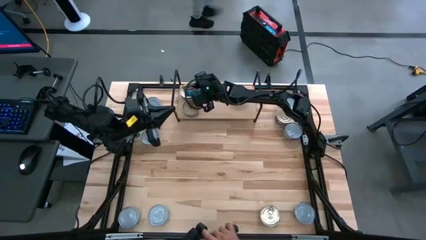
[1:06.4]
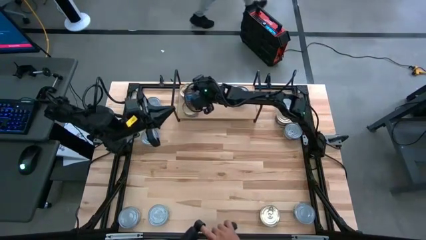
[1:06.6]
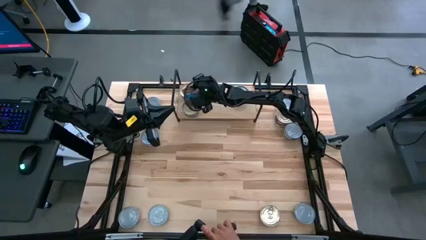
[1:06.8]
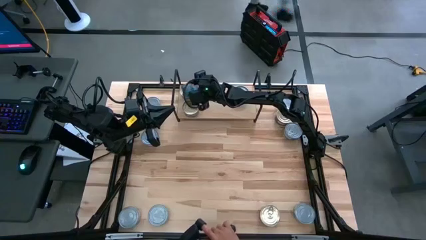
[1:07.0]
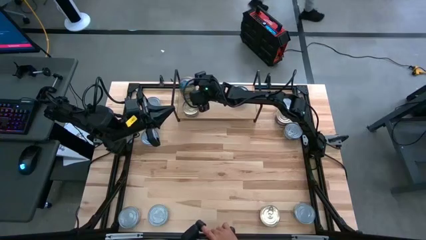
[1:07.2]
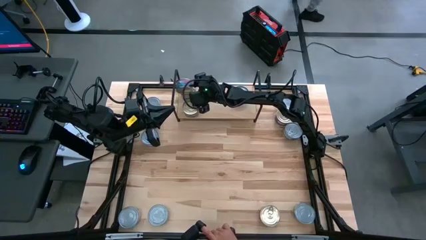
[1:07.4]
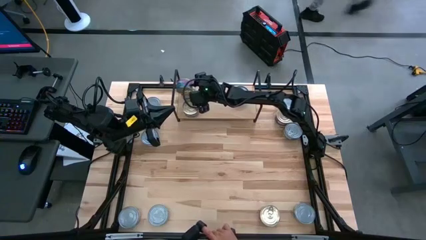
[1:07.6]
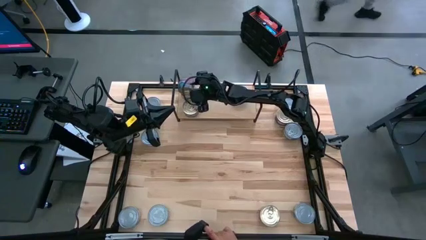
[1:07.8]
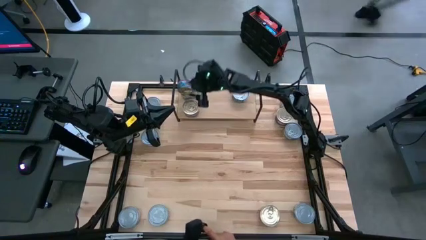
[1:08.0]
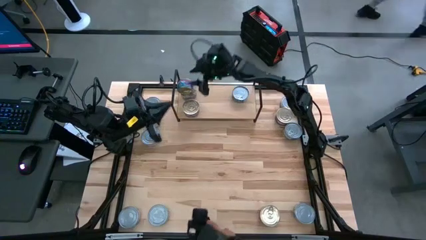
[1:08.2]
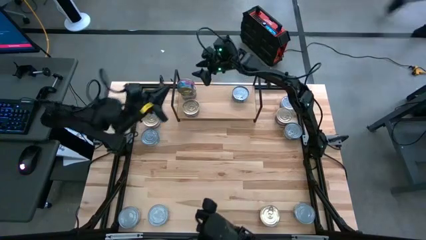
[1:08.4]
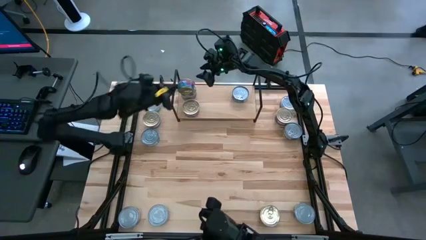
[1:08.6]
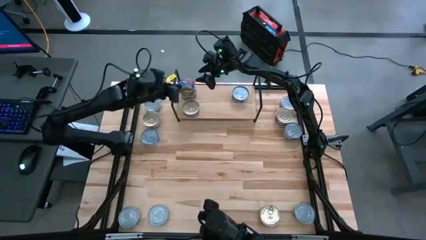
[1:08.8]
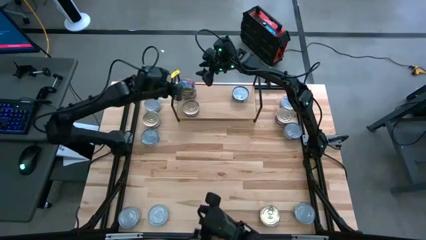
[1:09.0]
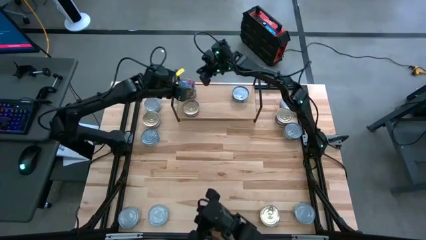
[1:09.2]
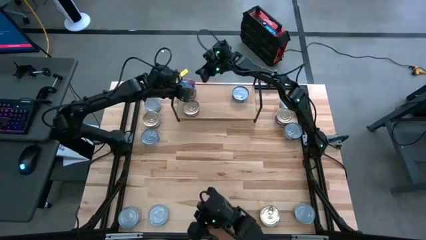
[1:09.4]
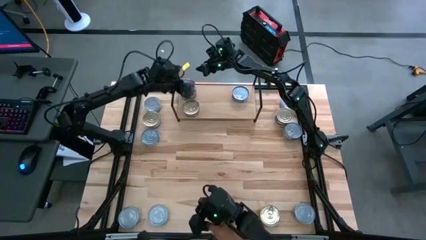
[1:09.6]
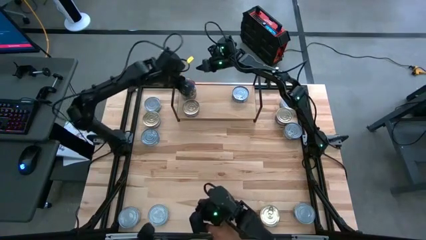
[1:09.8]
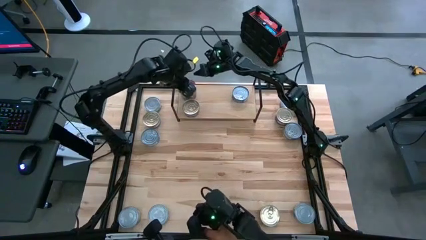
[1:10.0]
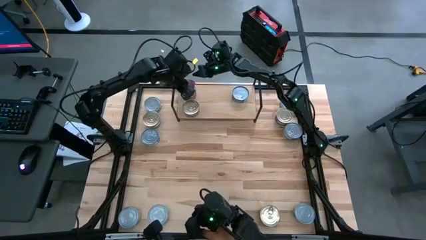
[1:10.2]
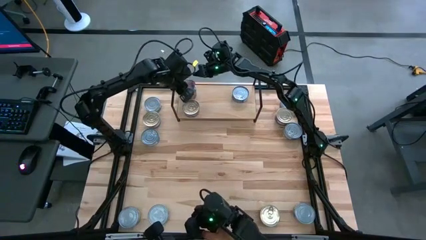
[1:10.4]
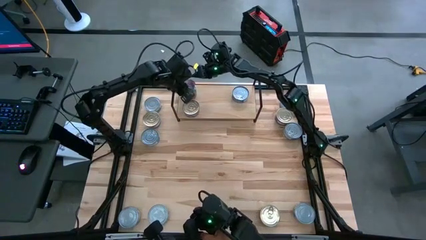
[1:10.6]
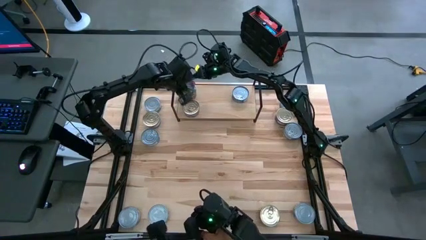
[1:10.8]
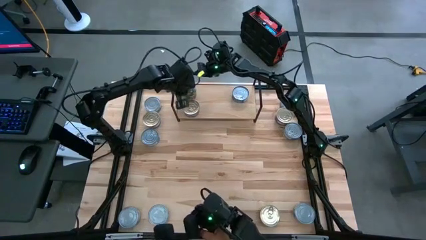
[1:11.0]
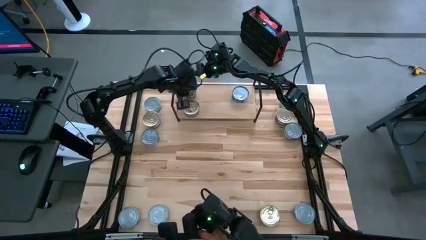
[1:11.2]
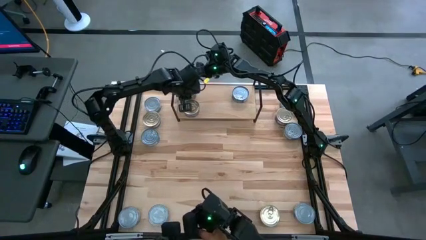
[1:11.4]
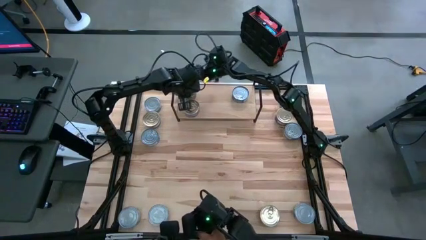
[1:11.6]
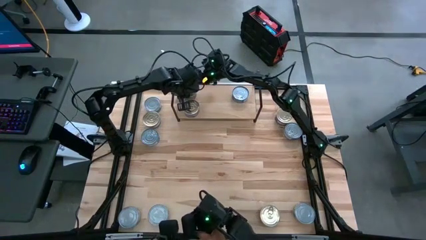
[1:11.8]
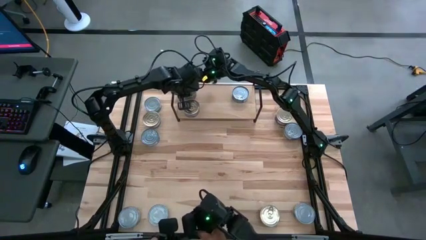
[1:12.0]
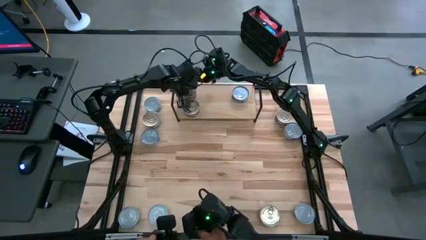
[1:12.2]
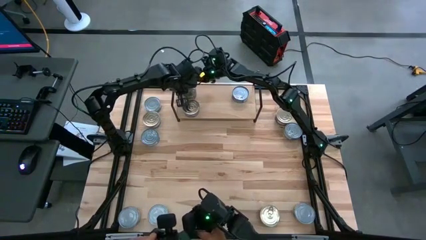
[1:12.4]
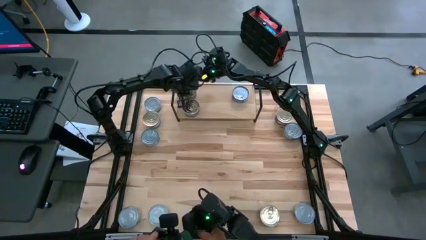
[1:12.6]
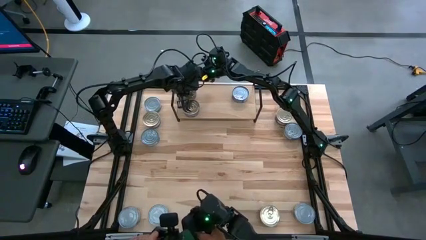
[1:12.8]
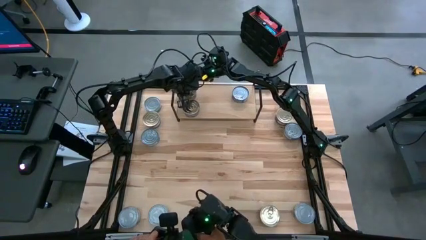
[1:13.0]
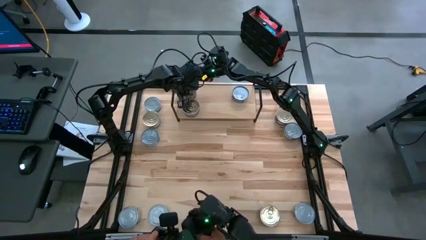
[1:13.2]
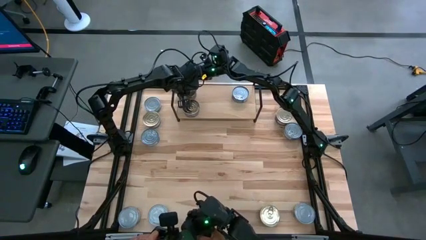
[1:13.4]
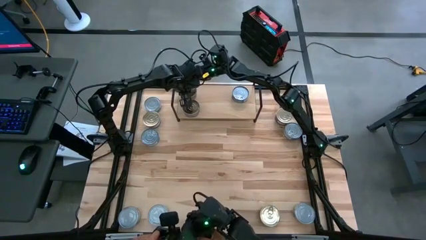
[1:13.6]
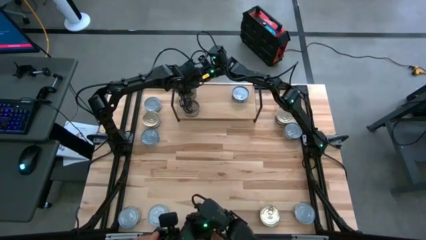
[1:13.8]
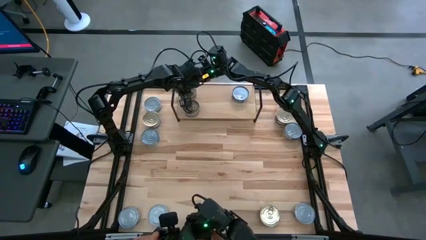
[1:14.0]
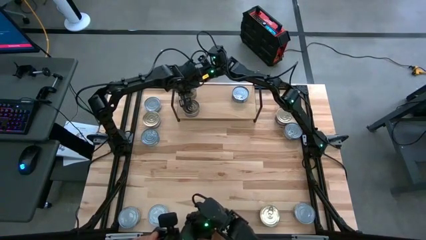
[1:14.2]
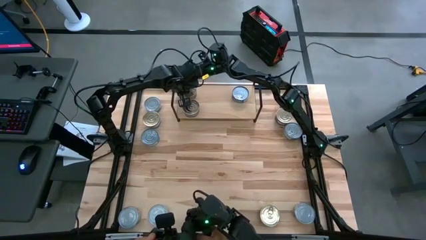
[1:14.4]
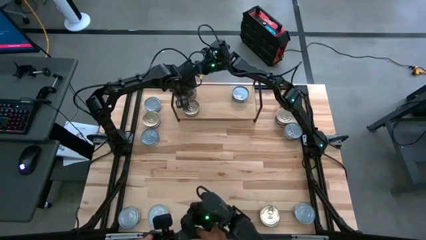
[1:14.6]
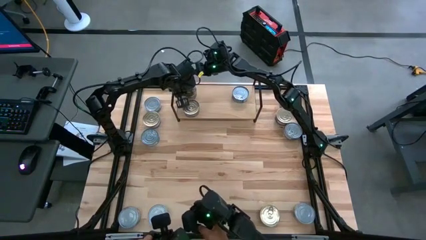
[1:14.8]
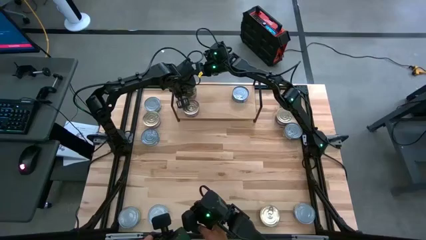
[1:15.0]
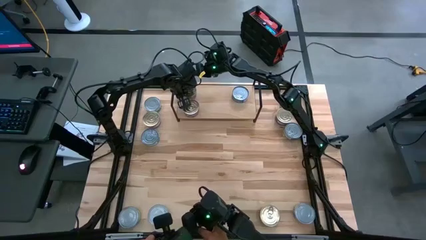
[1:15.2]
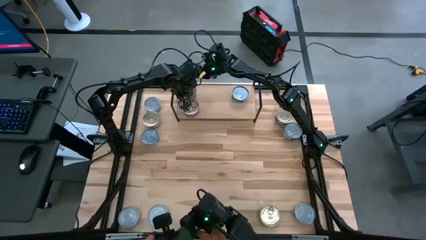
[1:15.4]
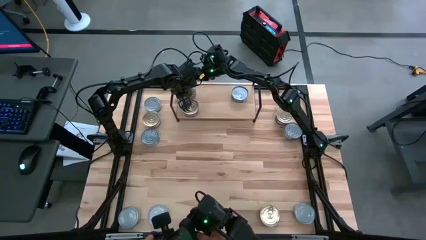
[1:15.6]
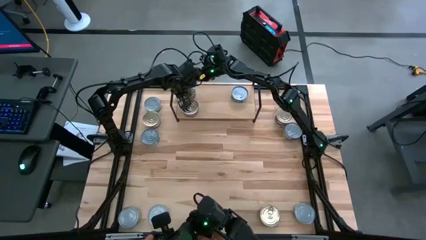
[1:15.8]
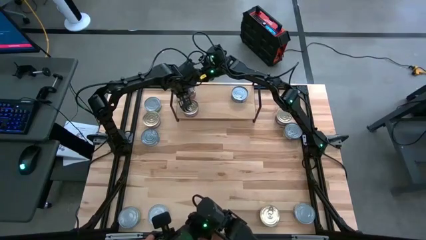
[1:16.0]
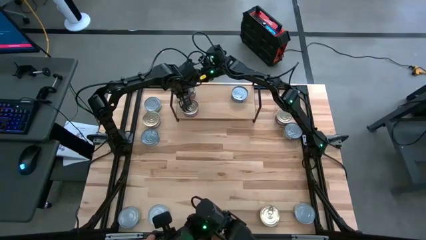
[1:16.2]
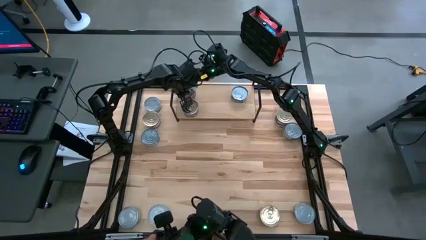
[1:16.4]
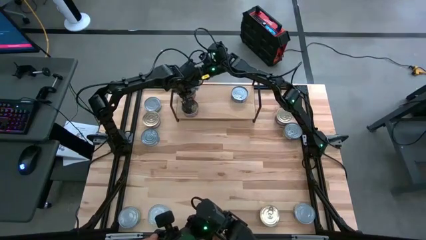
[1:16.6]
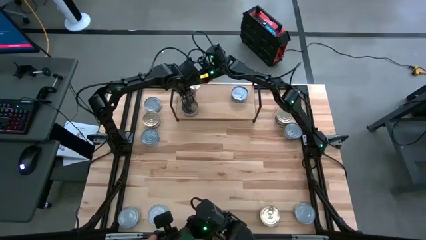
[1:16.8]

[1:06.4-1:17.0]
Task: Stack canned seafood by type on shelf
Stack the blue pink tuna can on top of the other blue pink tuna can on the shelf

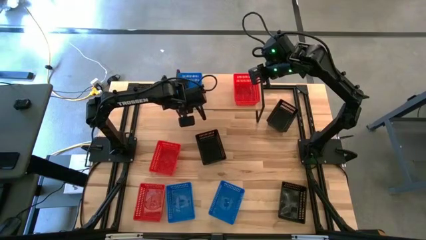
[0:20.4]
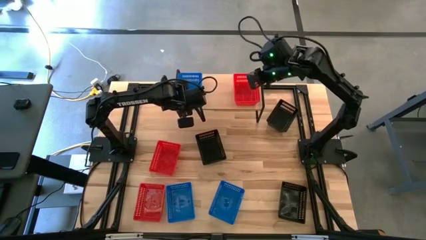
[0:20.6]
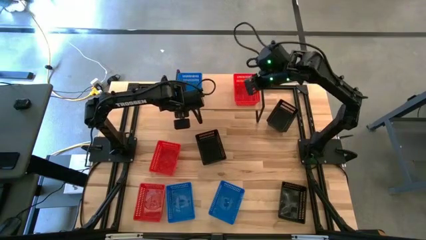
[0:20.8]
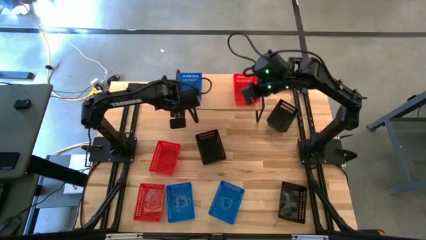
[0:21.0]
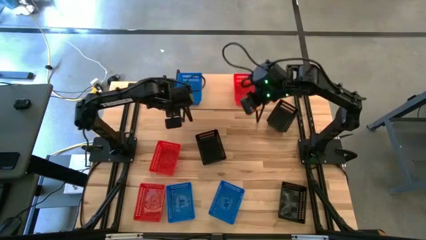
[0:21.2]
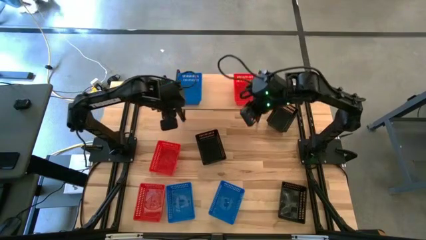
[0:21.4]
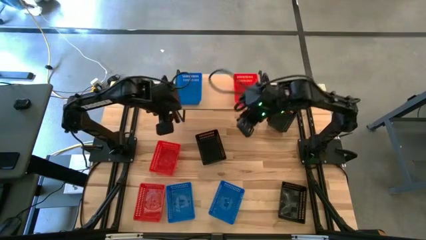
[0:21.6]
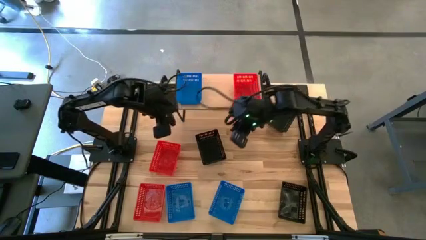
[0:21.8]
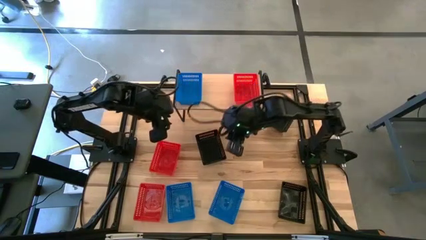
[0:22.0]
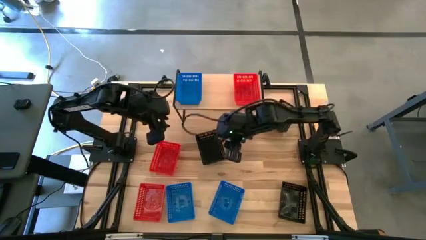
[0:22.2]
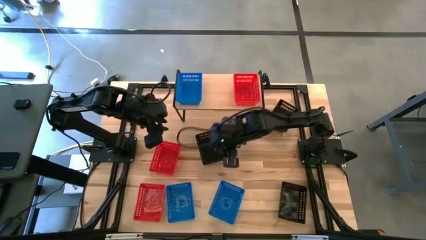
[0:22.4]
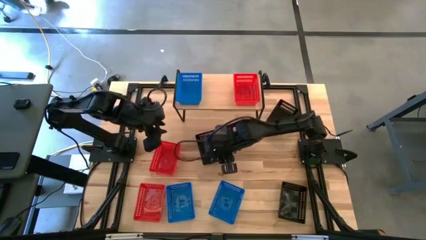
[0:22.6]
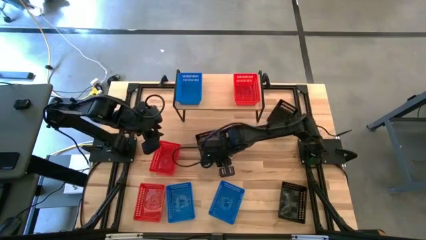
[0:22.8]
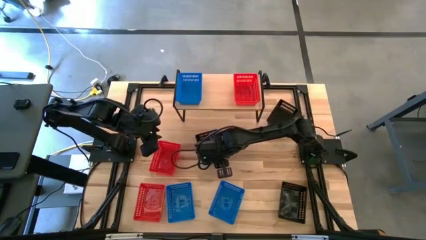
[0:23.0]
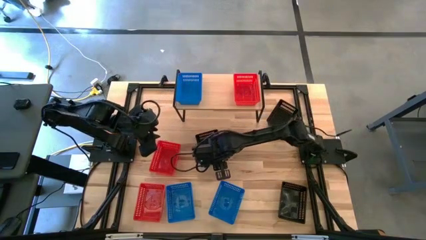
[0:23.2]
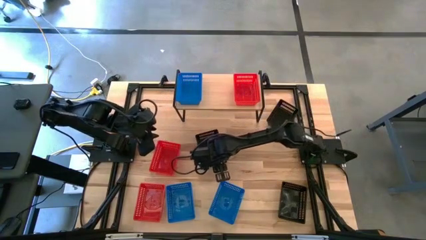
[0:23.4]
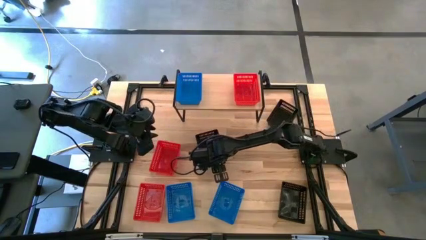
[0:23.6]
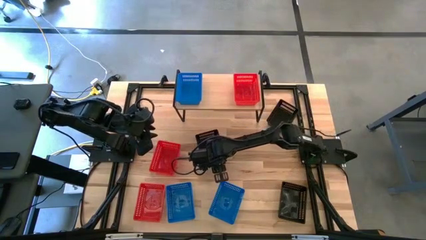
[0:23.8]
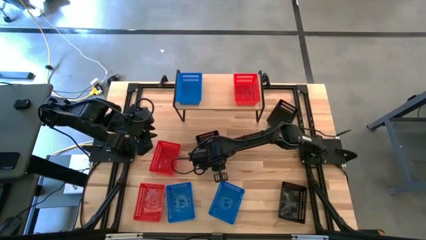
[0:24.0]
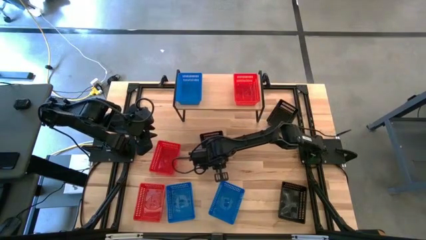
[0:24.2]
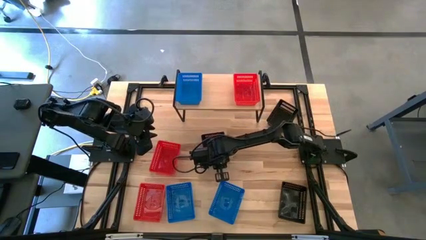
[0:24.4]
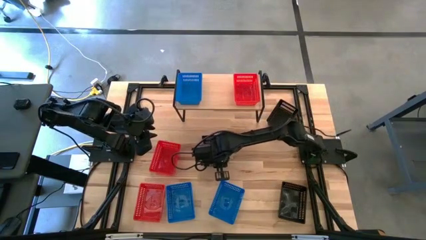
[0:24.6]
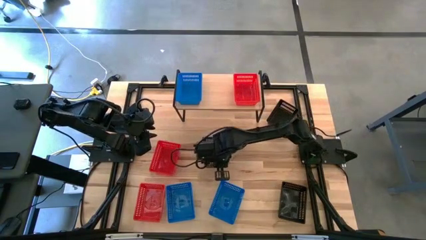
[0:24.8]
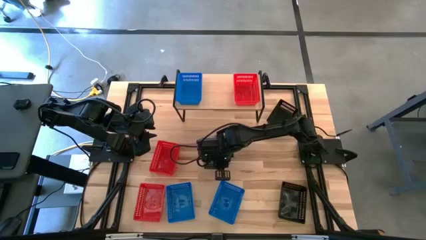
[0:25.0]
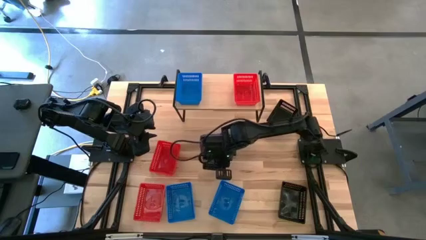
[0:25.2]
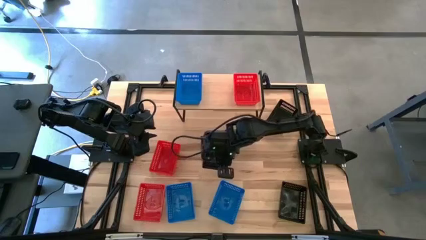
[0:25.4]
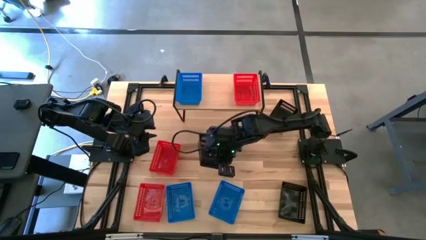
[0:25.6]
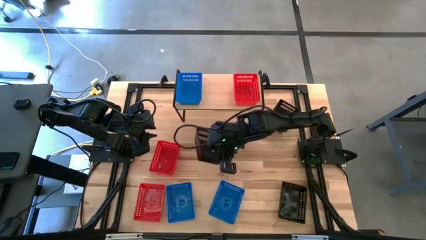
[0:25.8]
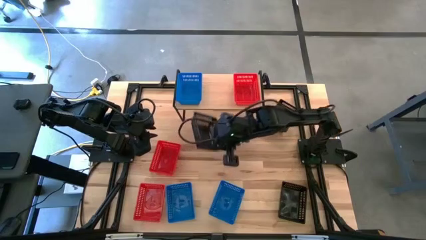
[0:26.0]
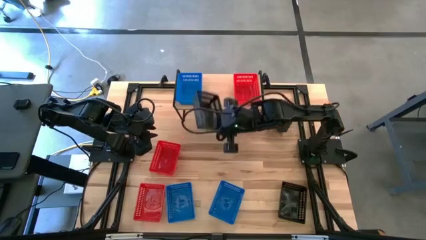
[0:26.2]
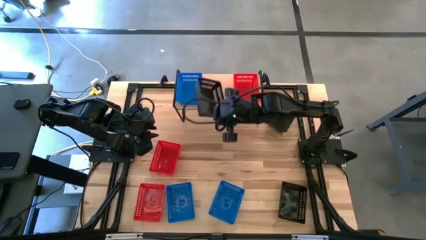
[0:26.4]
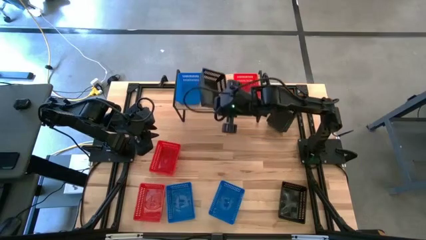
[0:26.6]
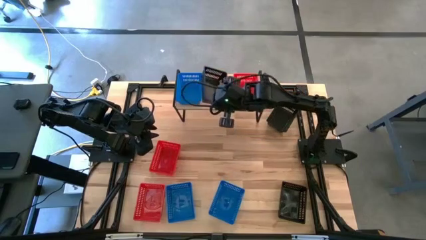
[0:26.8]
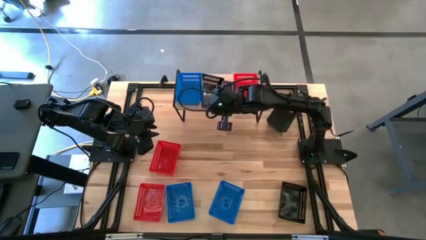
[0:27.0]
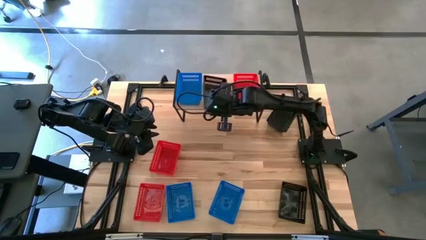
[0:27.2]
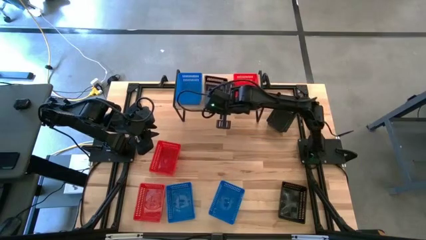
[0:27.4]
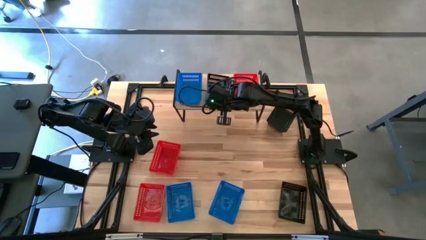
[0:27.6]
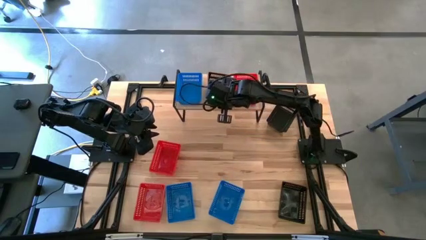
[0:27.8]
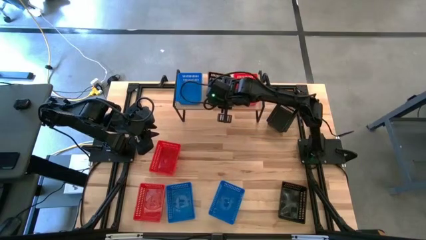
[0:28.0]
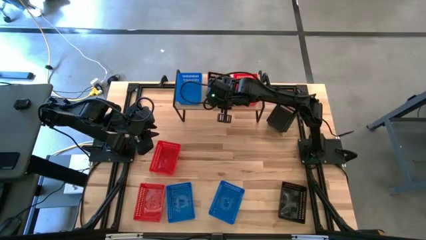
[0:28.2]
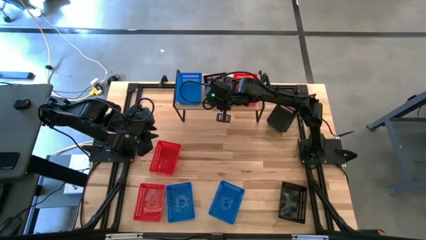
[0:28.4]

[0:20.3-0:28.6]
Task: Stack baskets on shelf by color
Put the middle black bin on the shelf
